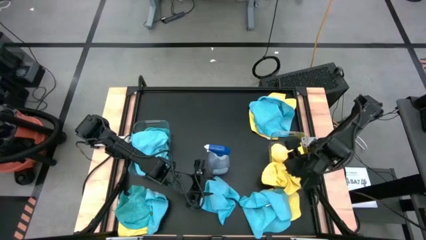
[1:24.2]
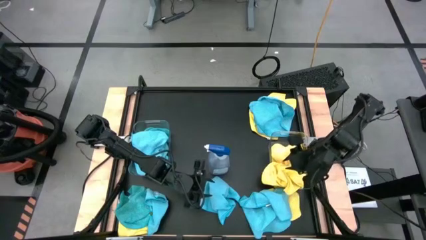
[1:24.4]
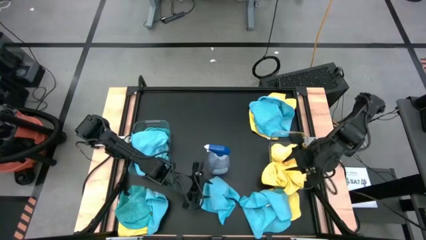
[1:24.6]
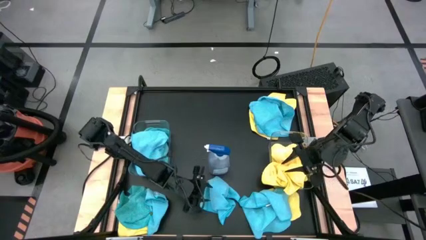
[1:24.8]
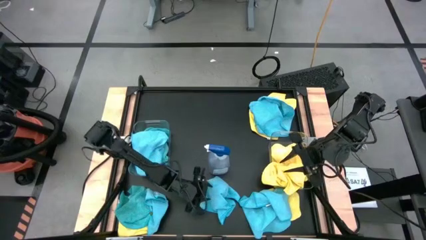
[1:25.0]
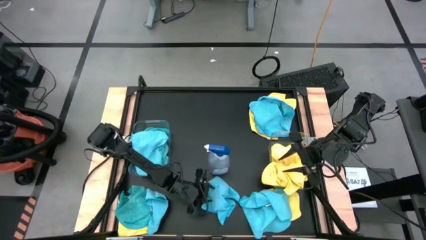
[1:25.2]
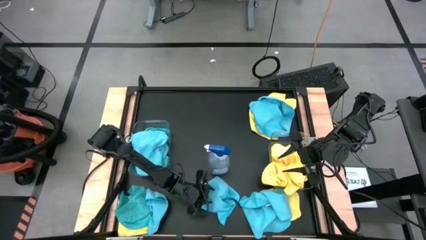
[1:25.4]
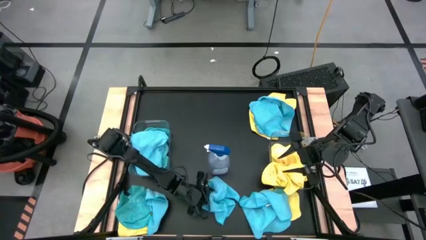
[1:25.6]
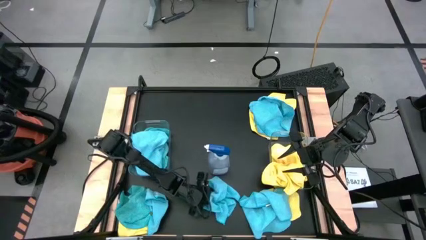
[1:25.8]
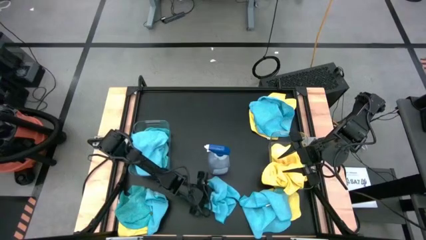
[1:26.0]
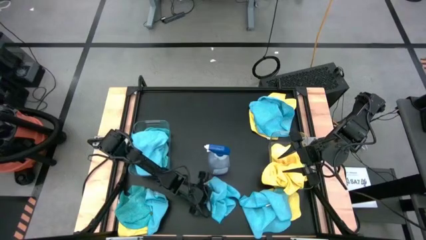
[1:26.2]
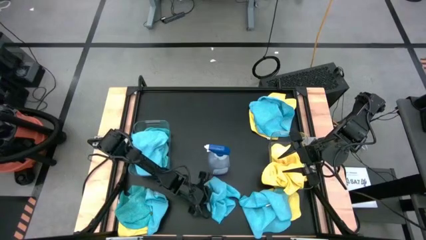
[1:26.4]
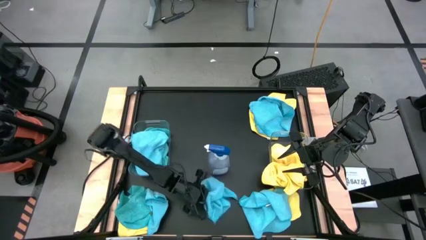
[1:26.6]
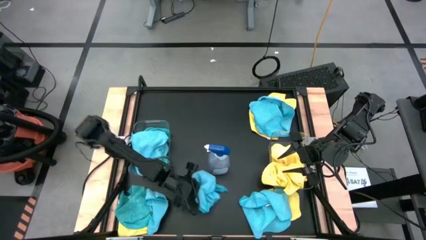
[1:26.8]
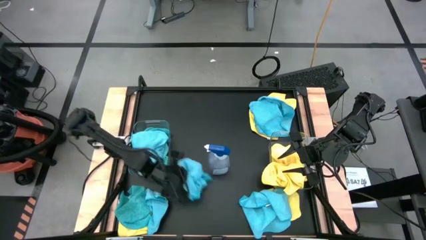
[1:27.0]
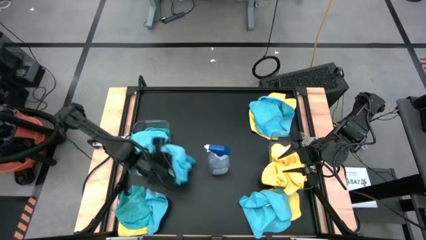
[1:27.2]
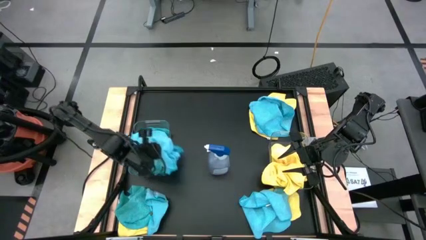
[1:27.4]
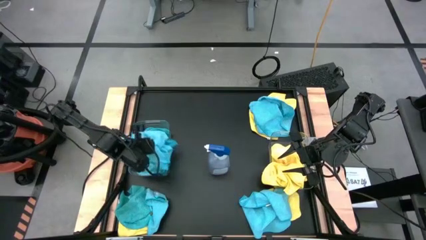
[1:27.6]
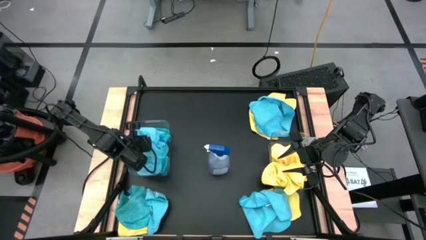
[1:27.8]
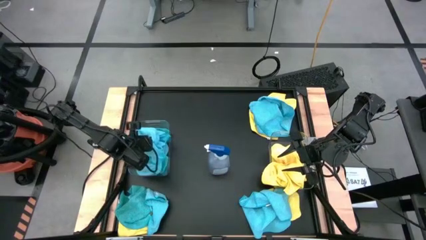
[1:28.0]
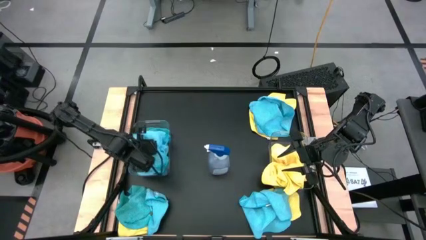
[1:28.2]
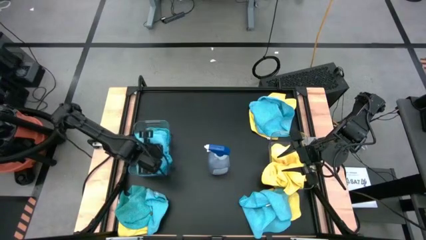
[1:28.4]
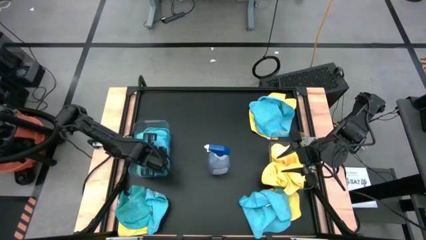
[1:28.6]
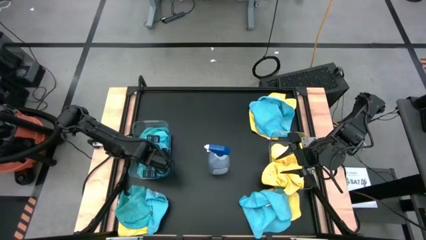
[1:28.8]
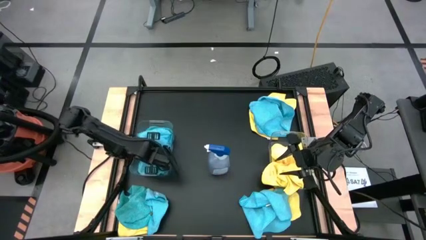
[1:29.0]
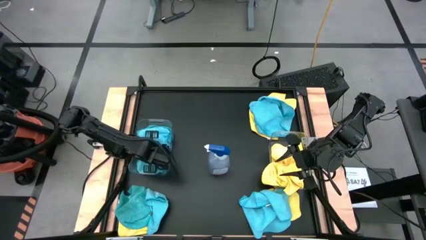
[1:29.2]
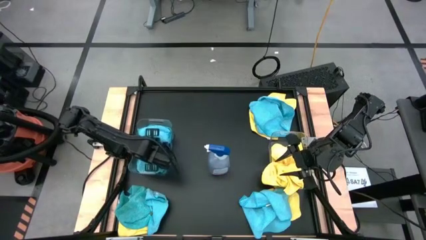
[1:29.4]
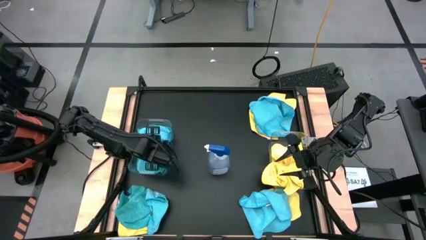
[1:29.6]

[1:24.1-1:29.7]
Task: Sort microfiber towel by color & place in baskets
Put the blue microfiber cloth into the left transparent bin

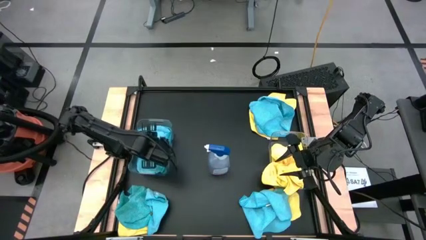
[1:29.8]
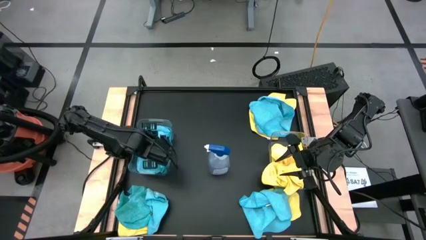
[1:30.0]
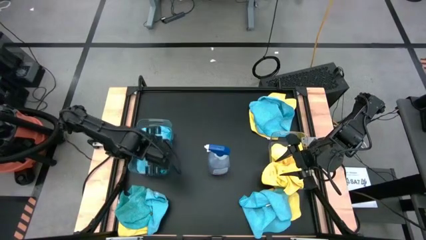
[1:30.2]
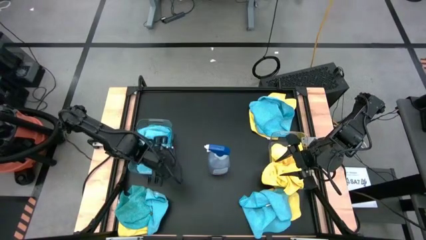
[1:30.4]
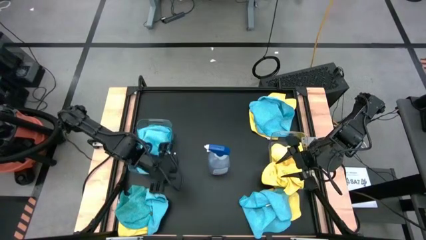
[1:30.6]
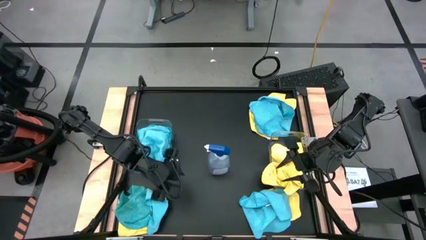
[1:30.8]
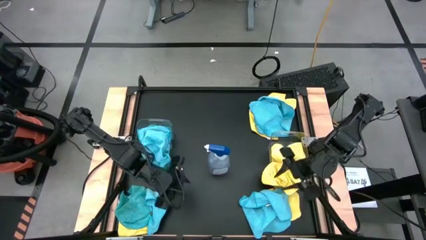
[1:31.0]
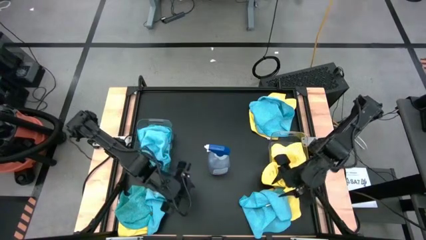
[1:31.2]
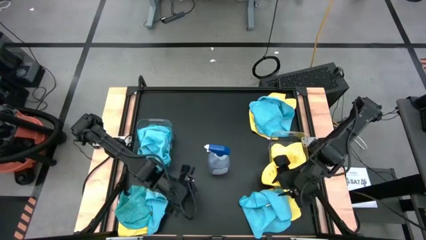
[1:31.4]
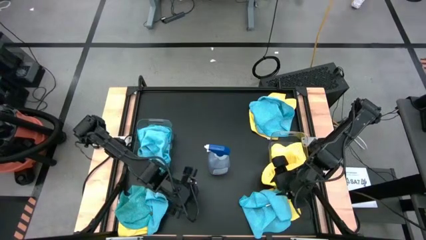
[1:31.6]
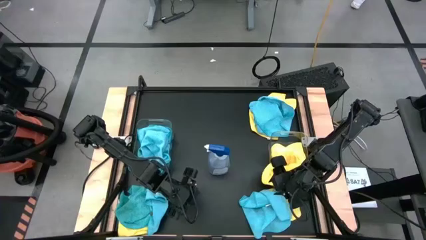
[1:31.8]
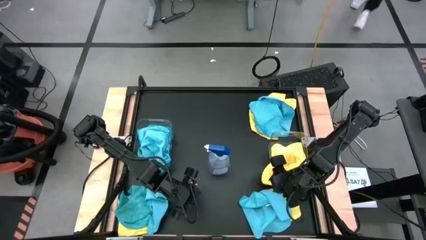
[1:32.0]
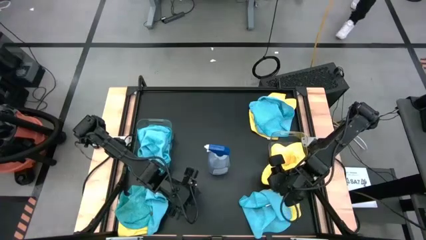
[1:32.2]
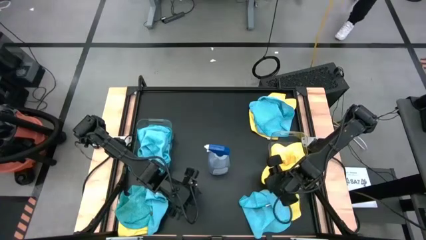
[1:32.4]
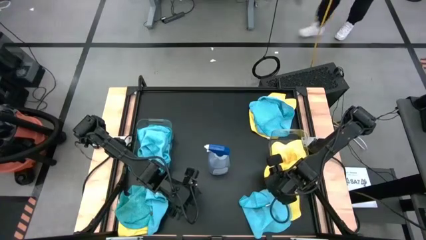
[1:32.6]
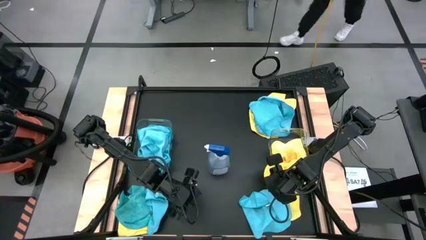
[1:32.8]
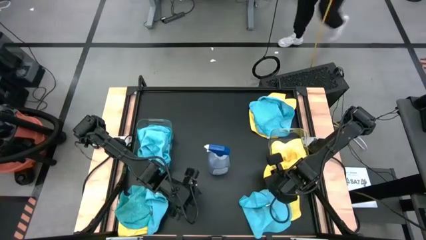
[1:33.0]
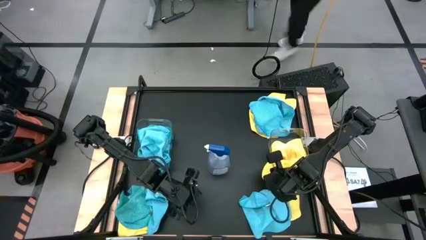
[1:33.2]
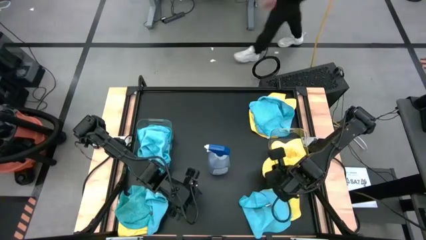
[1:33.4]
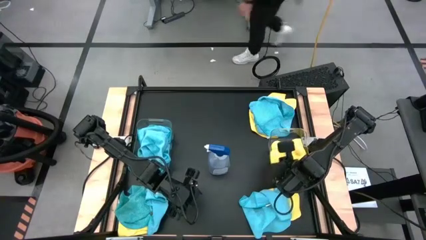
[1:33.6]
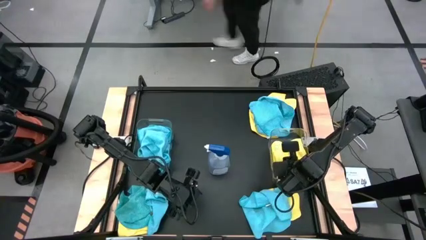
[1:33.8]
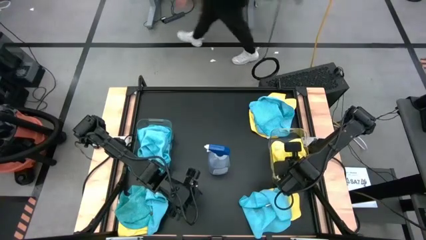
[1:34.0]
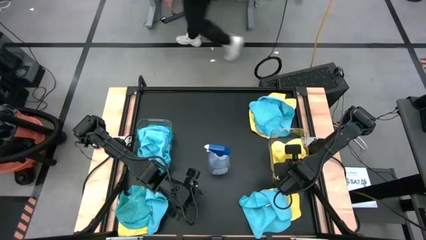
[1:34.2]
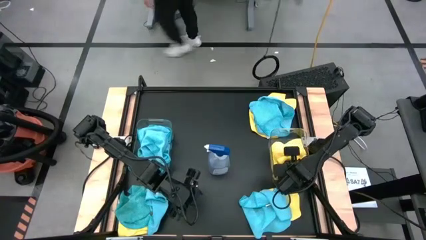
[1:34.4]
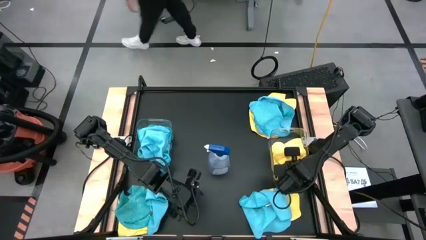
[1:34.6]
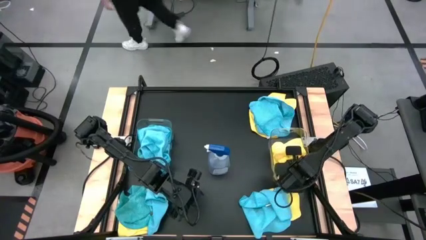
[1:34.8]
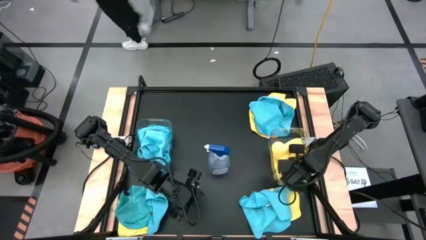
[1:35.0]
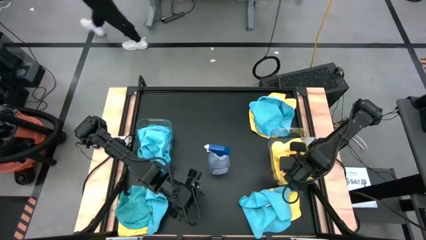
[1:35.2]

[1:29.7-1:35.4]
Put the yellow microfiber cloth into the right transparent bin

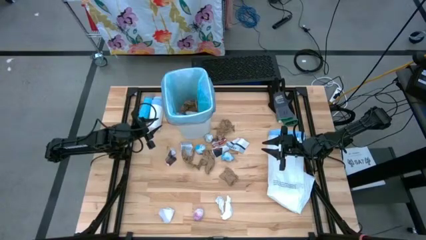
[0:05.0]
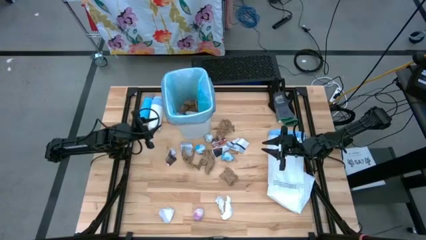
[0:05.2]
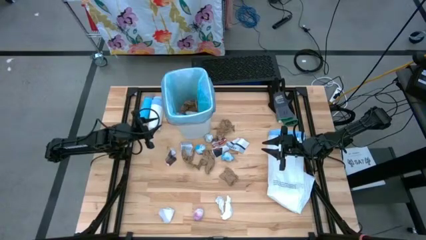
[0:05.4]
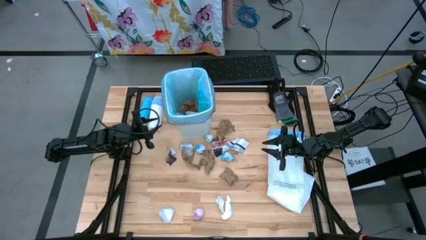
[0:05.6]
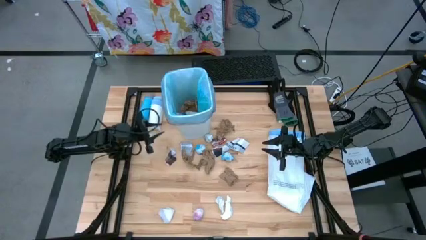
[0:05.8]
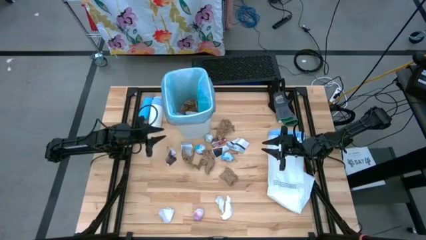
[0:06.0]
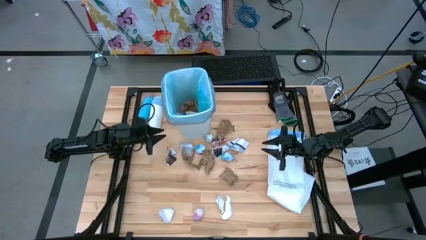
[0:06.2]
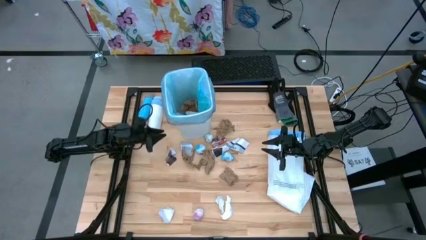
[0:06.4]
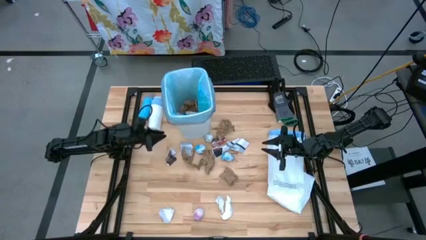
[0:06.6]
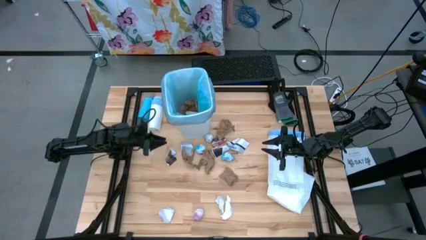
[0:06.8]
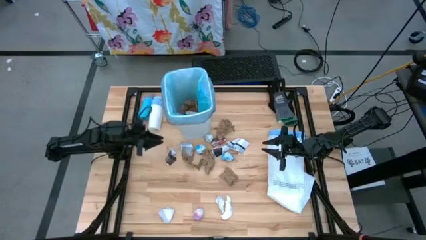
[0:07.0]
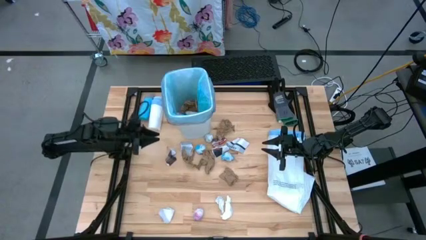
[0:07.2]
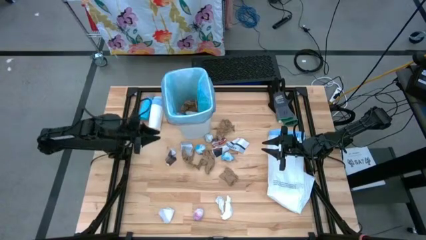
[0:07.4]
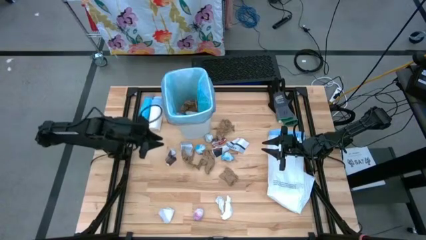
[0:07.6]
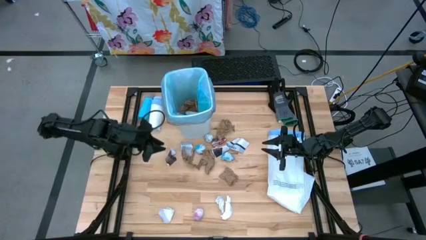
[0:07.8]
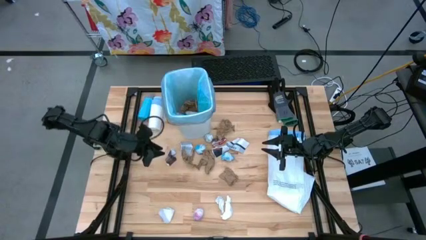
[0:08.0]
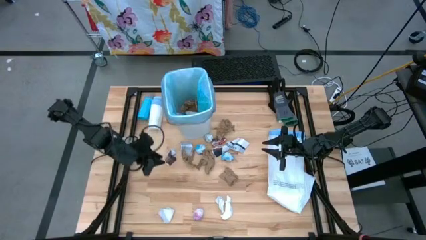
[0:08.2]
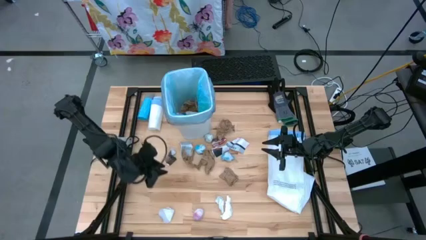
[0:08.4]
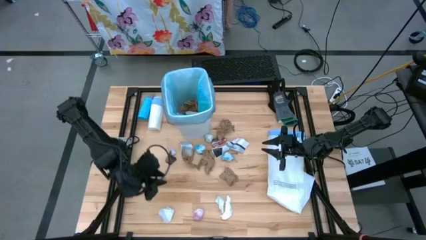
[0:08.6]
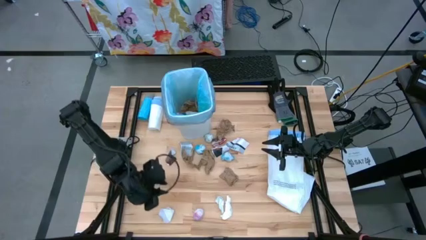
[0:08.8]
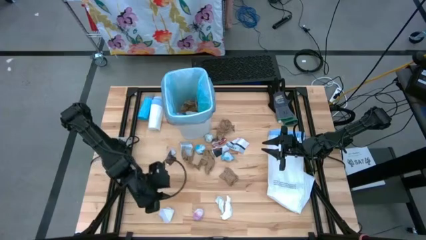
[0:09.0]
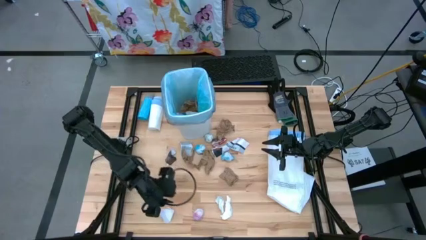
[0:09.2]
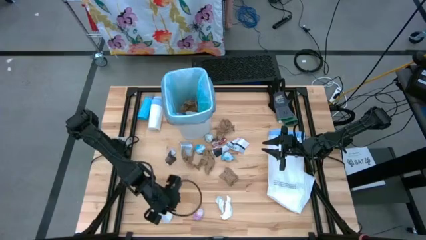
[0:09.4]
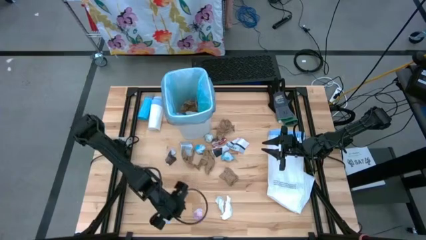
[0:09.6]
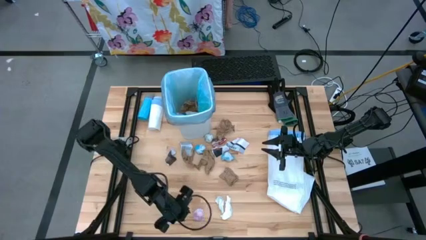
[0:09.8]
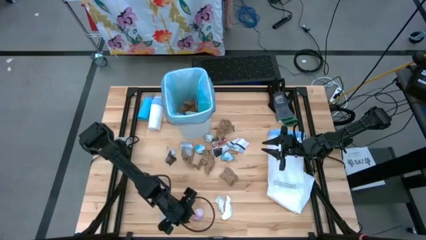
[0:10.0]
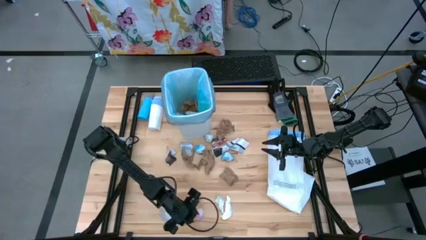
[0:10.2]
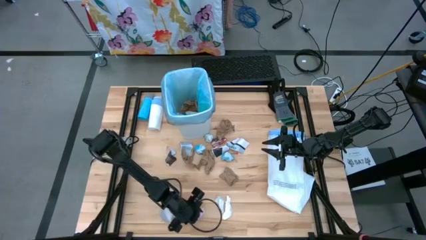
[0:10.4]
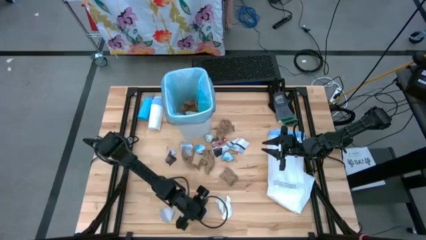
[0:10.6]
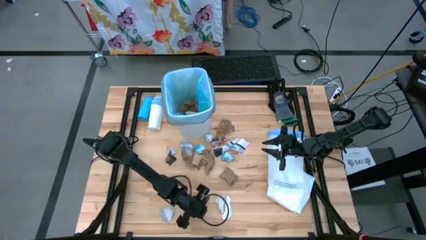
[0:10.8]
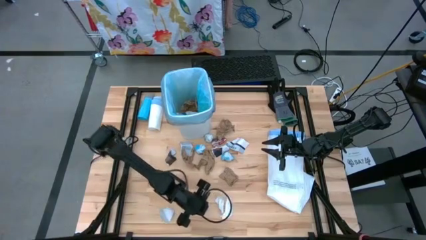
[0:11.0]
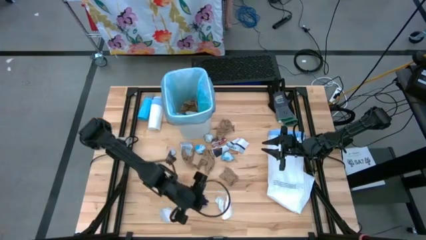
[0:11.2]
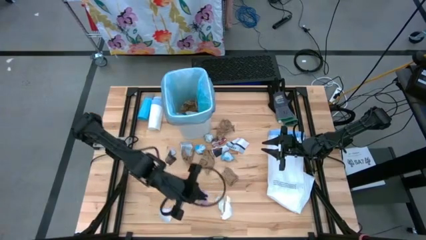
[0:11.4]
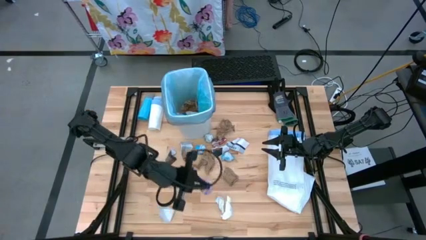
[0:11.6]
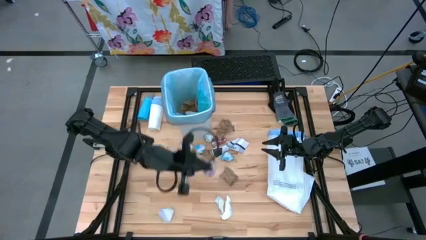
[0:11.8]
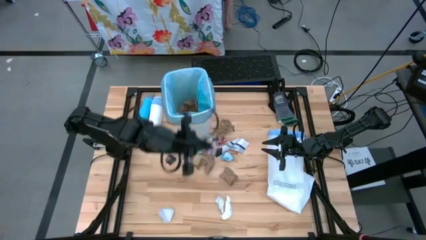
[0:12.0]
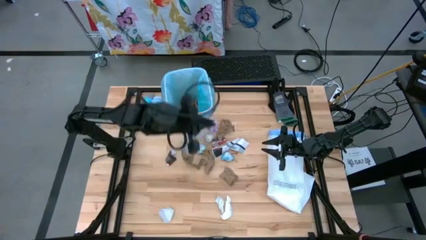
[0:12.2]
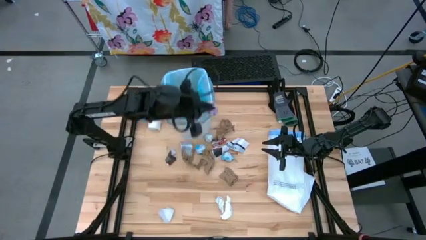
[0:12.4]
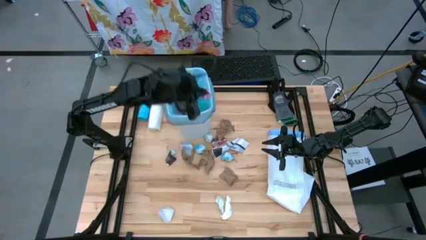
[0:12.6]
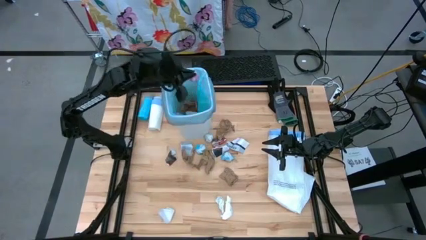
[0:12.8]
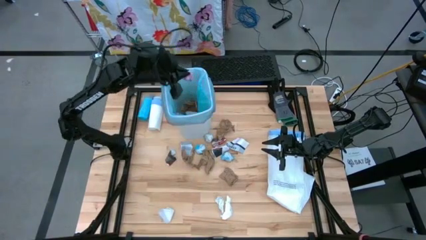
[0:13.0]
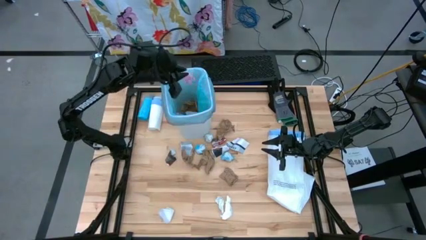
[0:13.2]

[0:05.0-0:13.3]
Task: place trash/remove bag and relplace
Put the pink trash bag into the white trash bin
